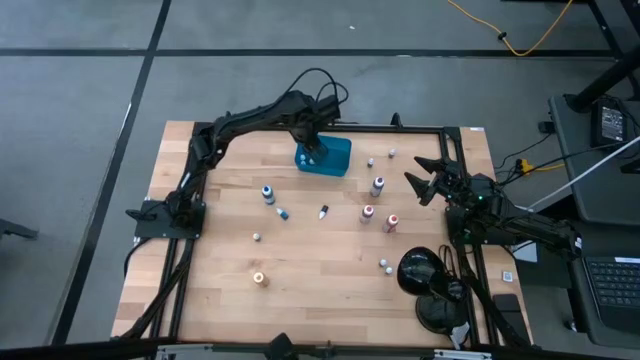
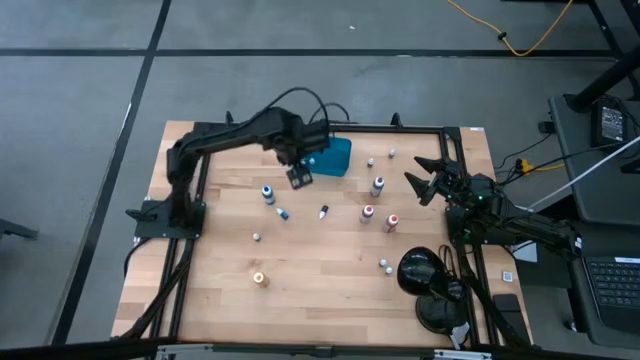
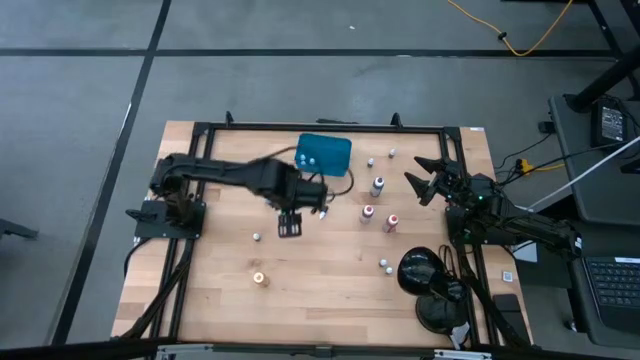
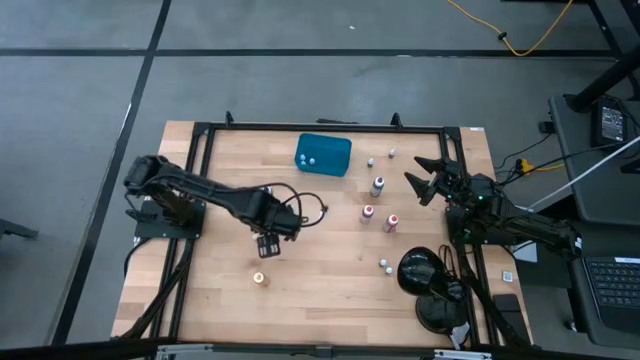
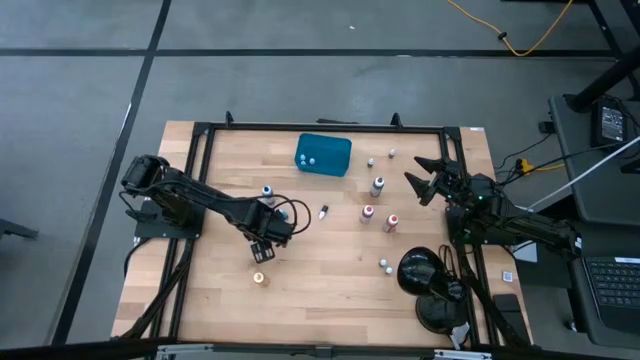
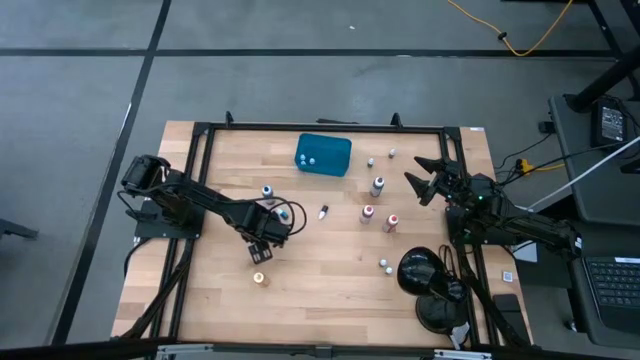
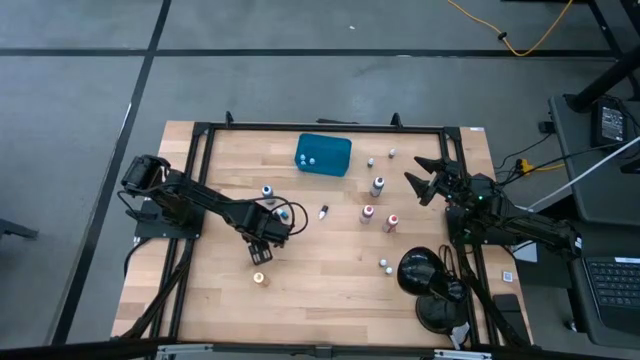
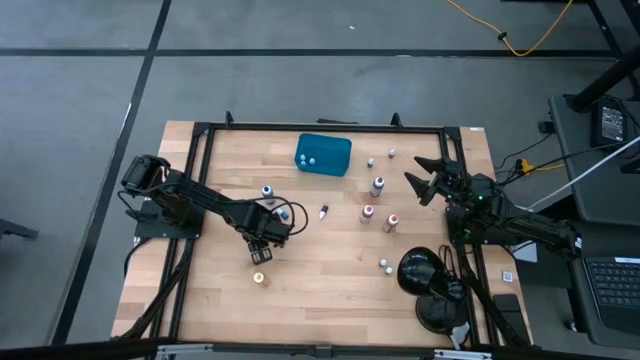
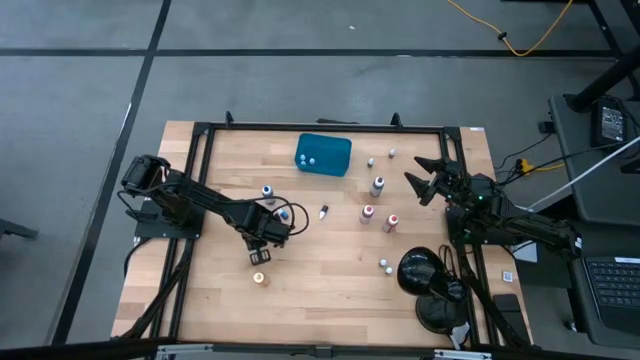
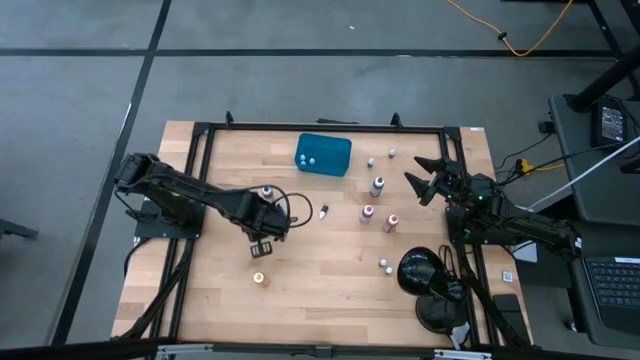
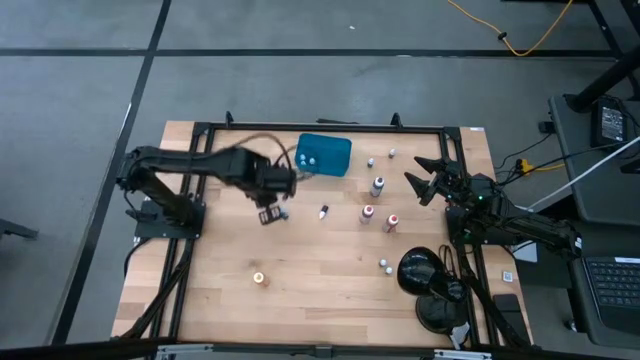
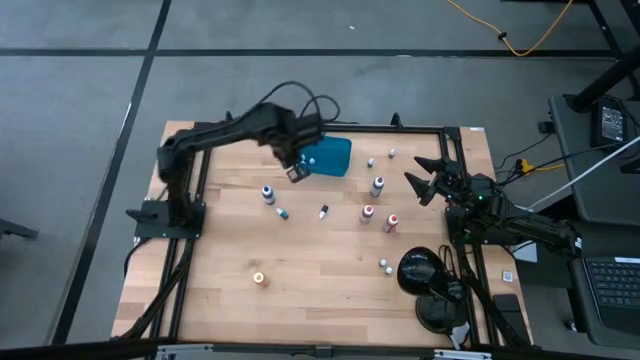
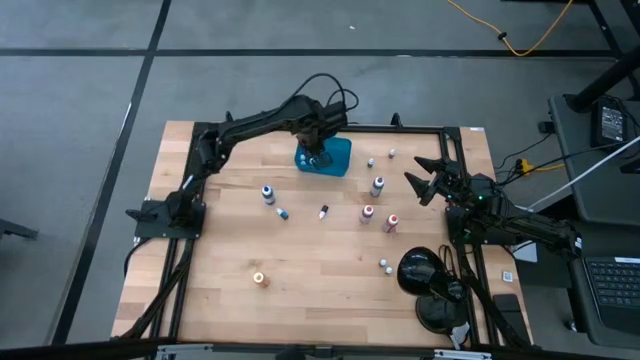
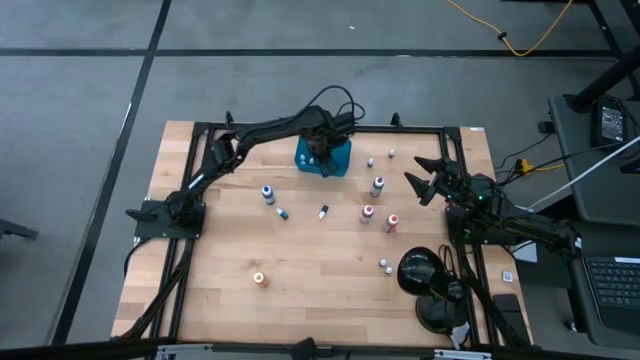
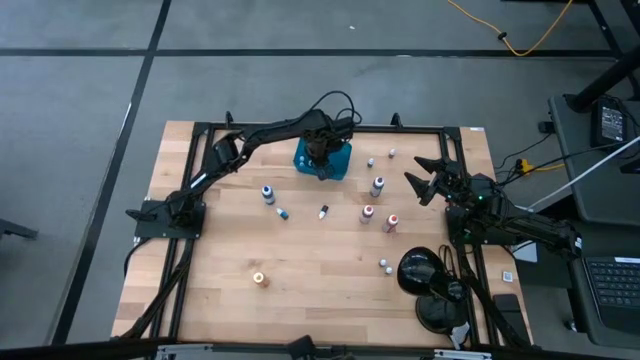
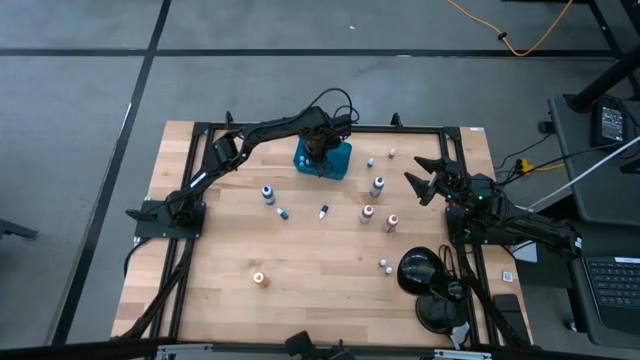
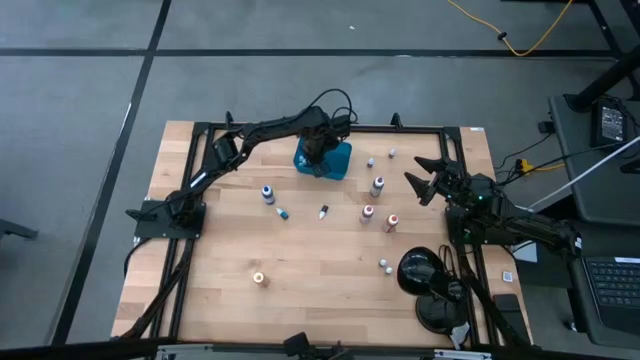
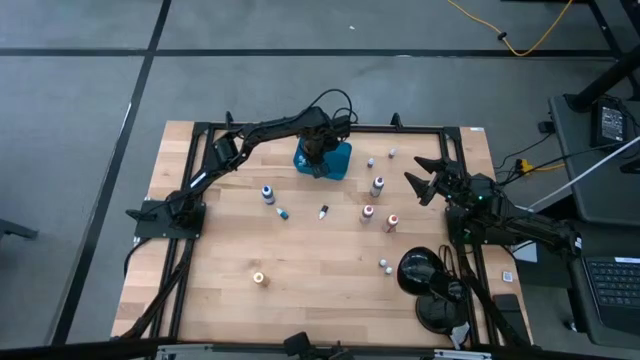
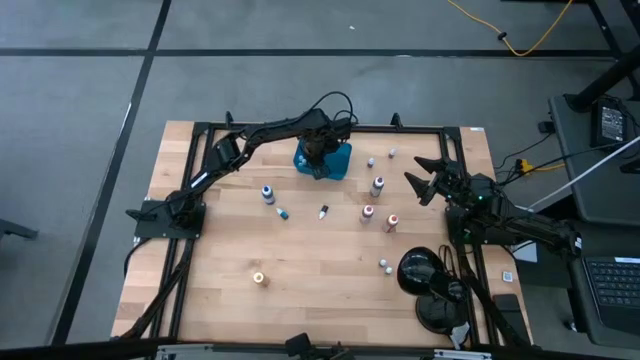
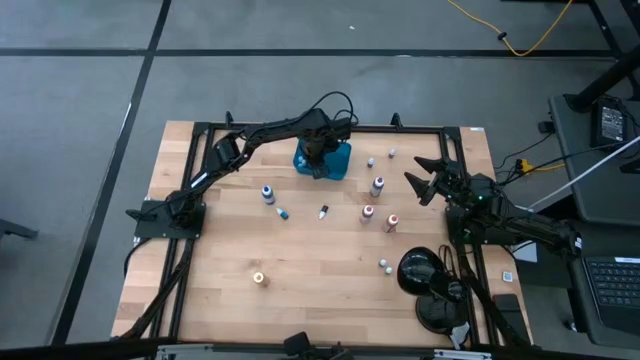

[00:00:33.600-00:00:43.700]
Task: Pick & Place food coloring
Put the small green food coloring bottle into the blue bin

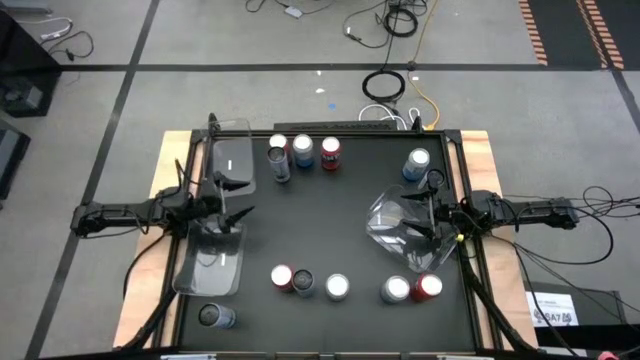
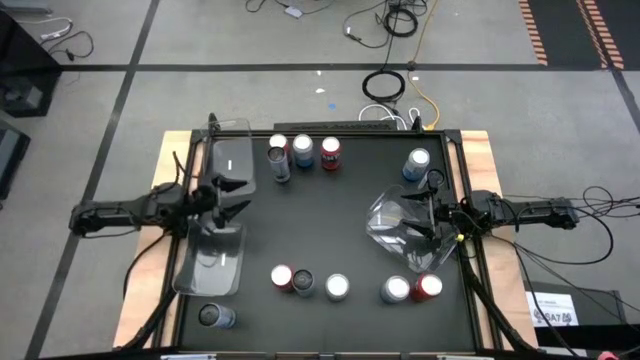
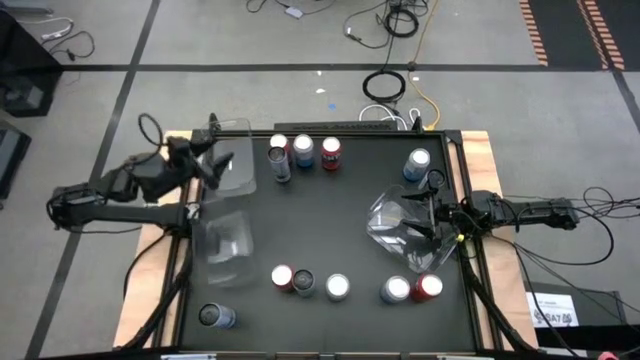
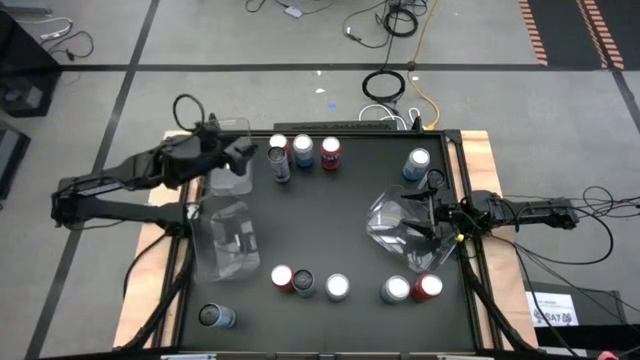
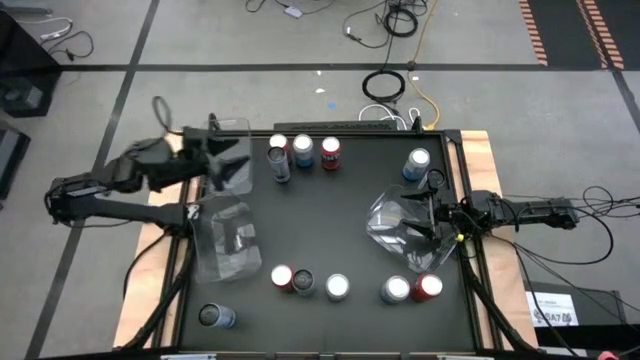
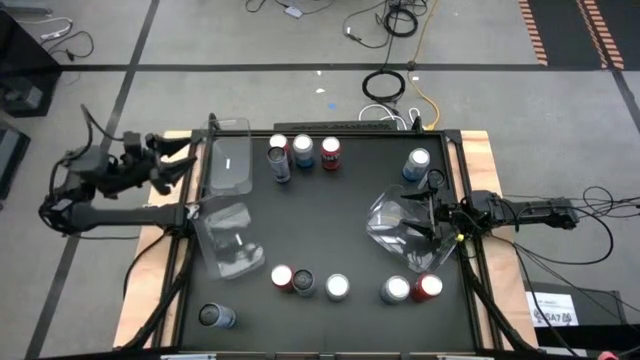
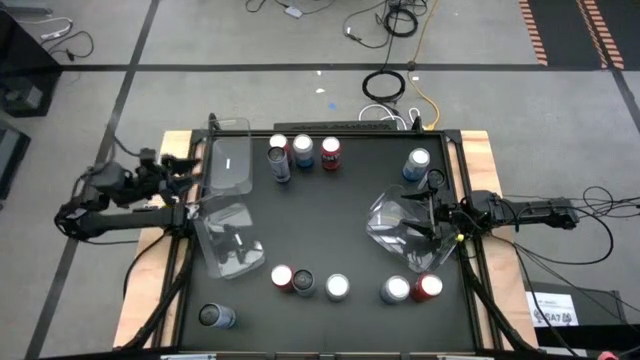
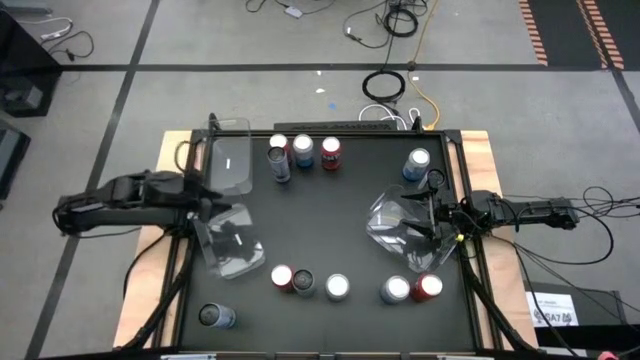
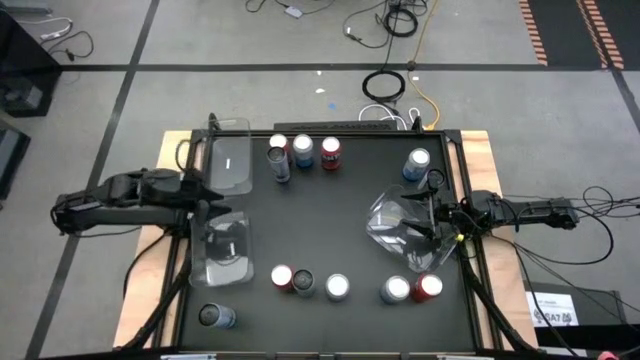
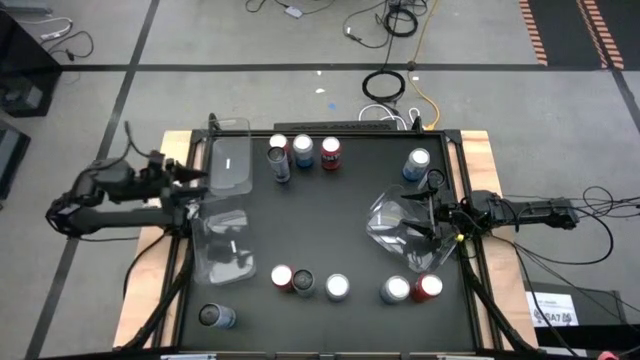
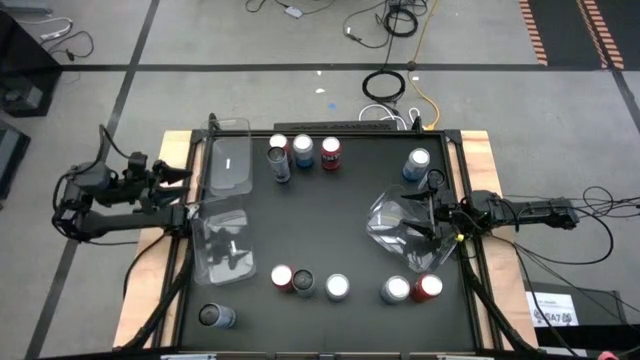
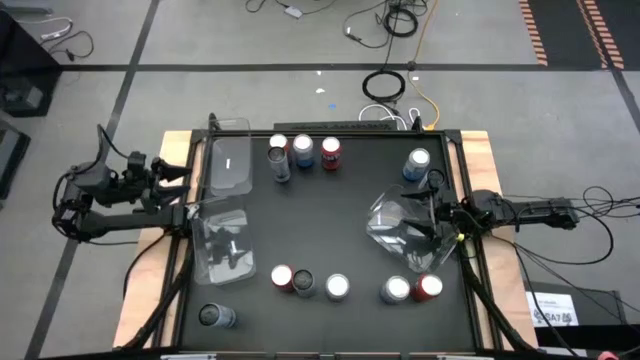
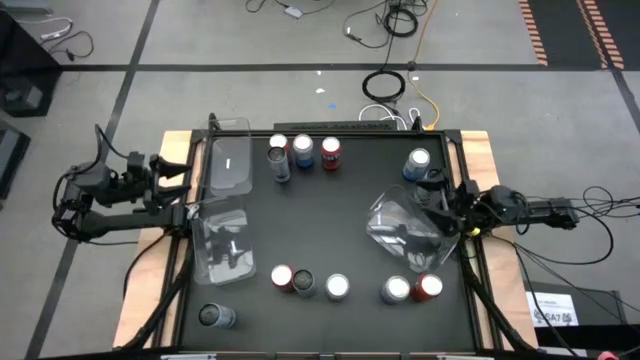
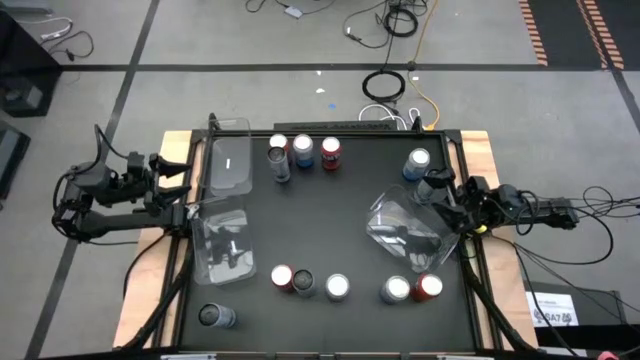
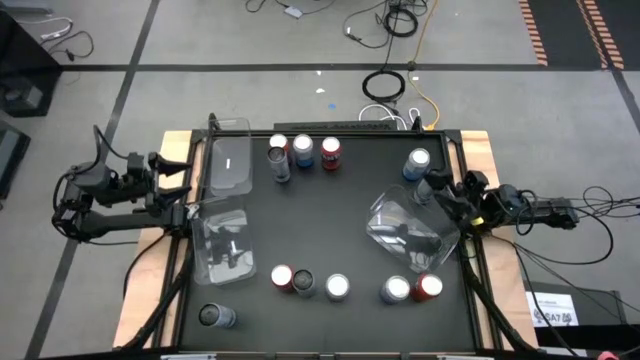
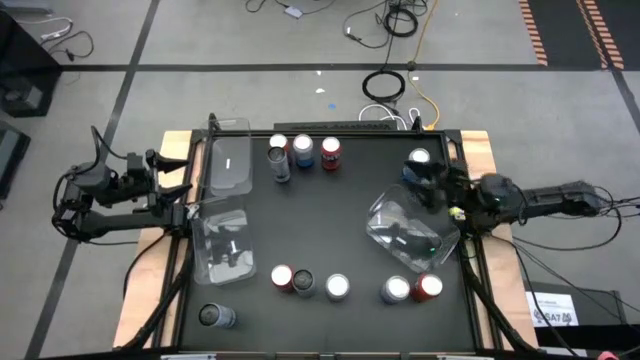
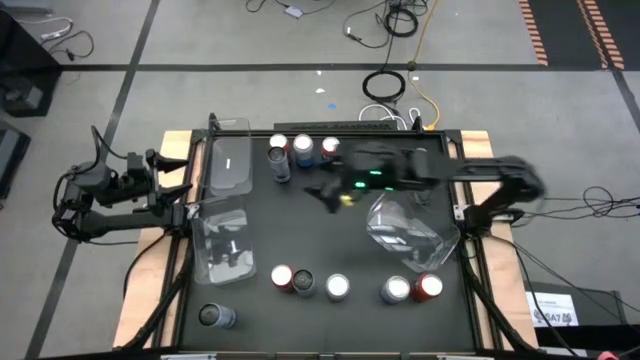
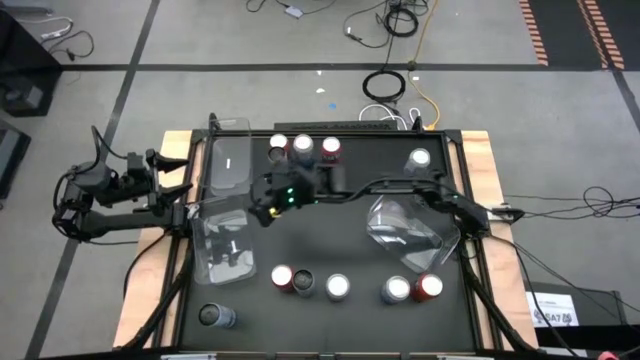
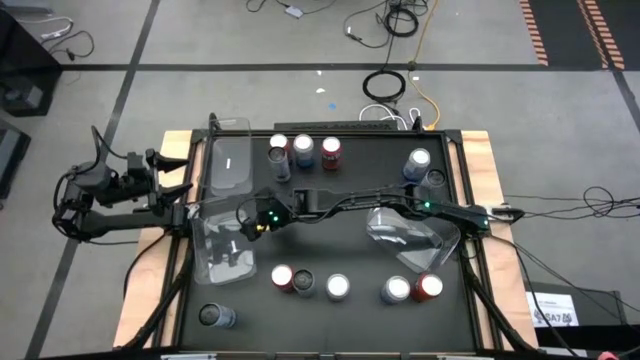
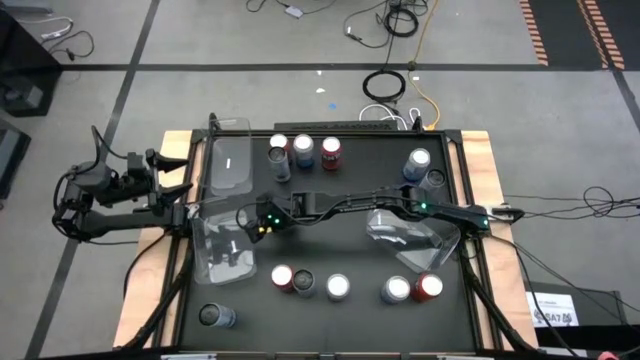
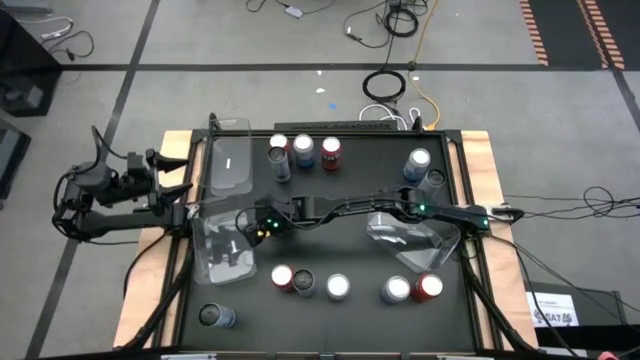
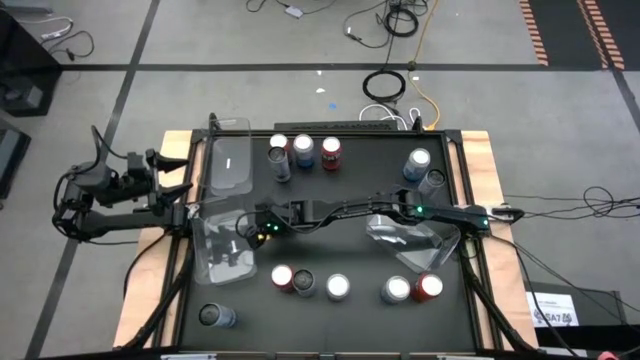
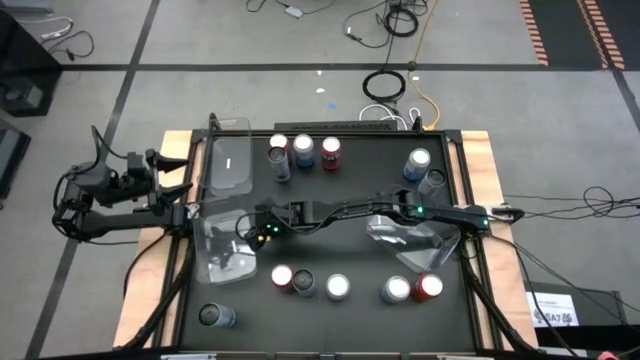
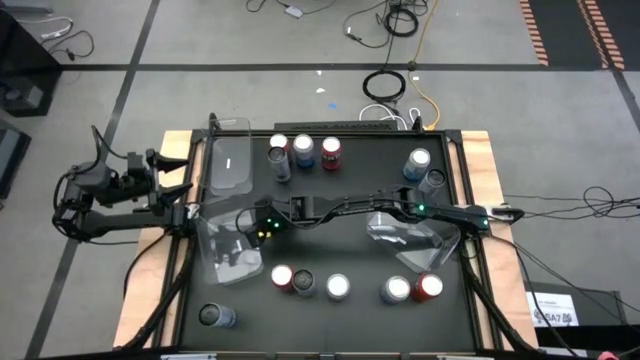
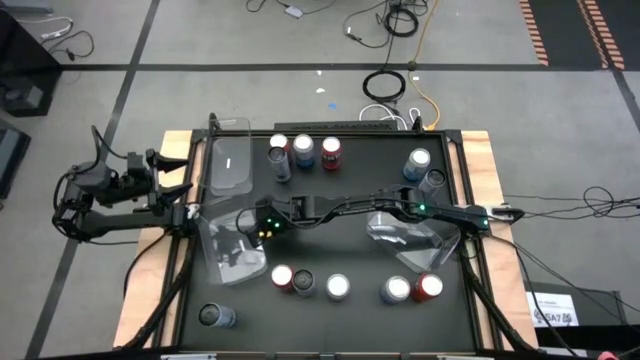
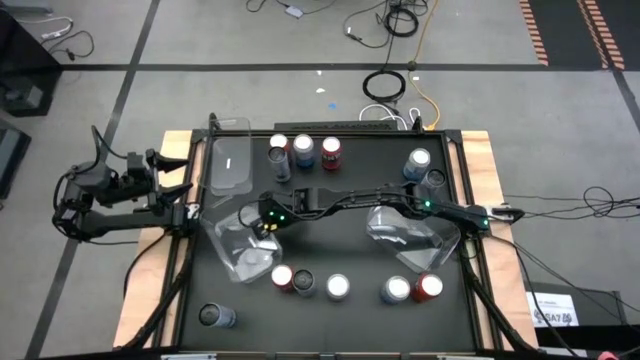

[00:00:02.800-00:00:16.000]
Task: Sort soda cans
Move the bottom left transparent bin to the center of the table
